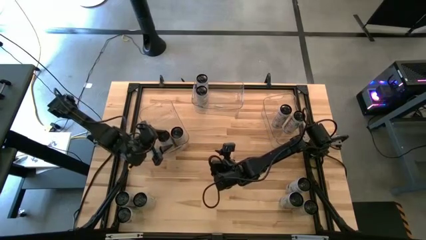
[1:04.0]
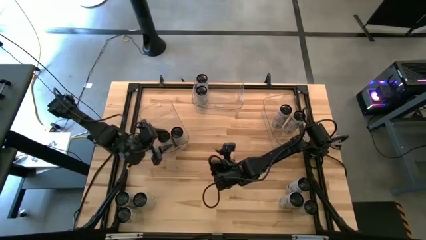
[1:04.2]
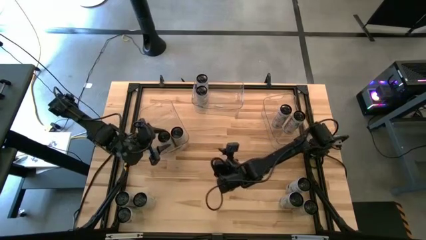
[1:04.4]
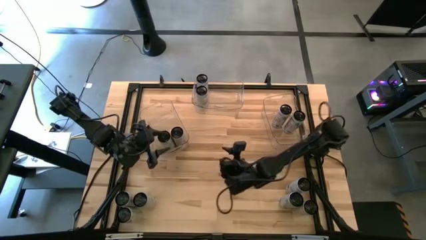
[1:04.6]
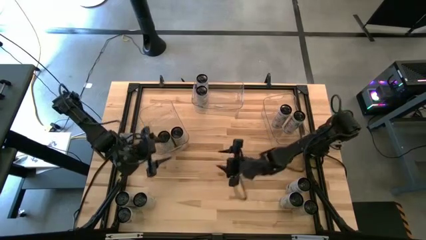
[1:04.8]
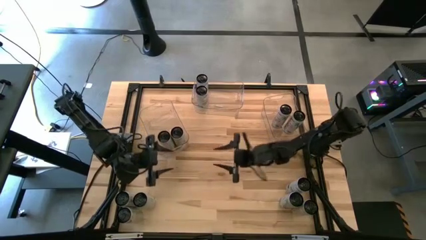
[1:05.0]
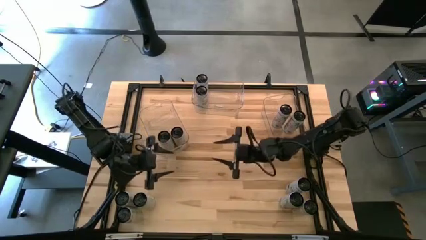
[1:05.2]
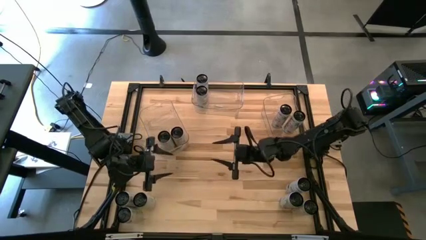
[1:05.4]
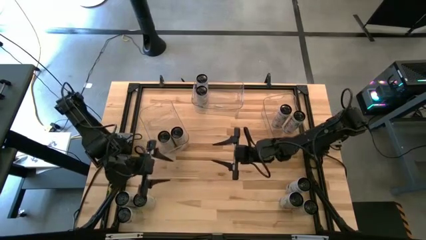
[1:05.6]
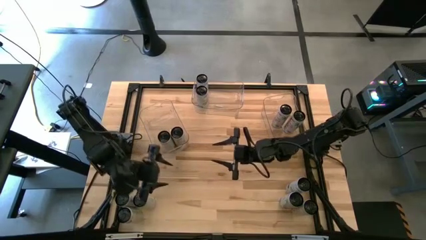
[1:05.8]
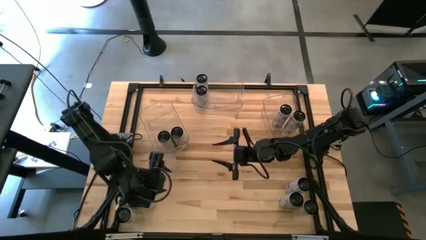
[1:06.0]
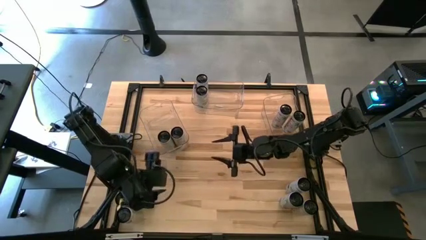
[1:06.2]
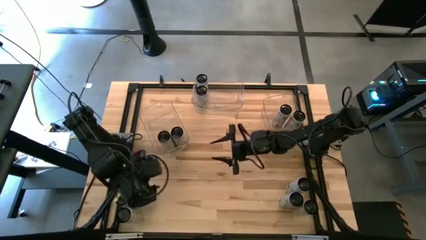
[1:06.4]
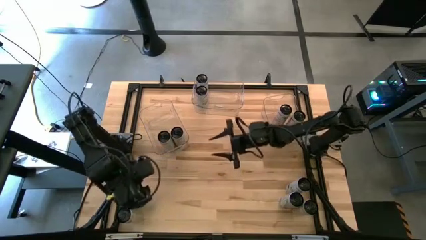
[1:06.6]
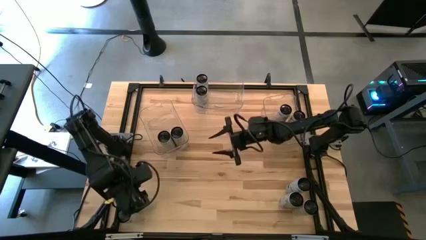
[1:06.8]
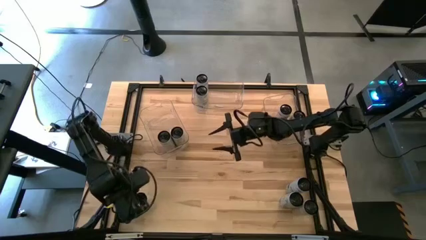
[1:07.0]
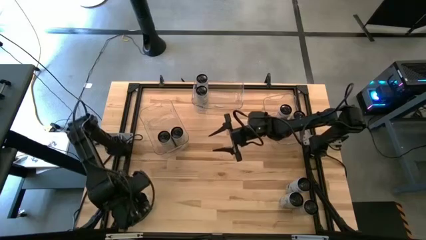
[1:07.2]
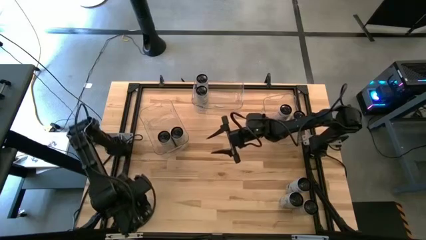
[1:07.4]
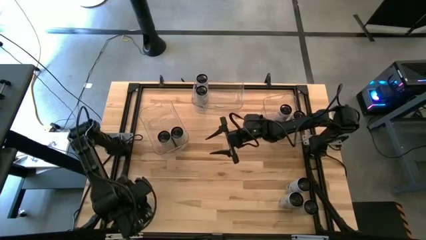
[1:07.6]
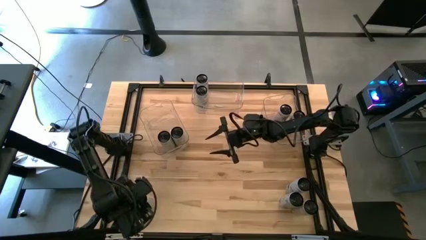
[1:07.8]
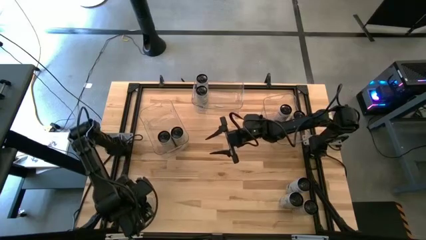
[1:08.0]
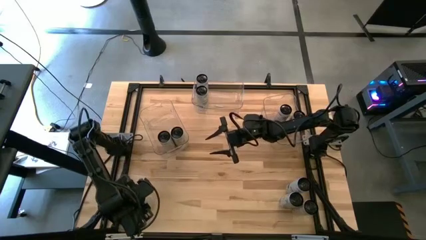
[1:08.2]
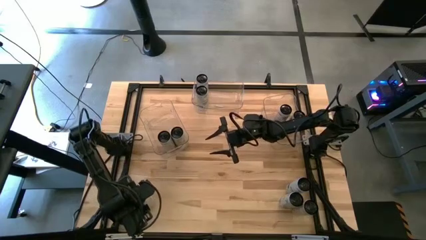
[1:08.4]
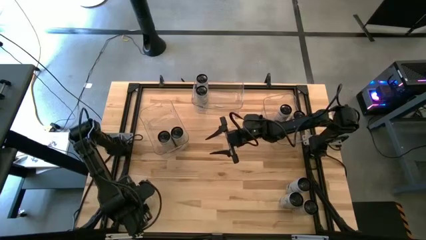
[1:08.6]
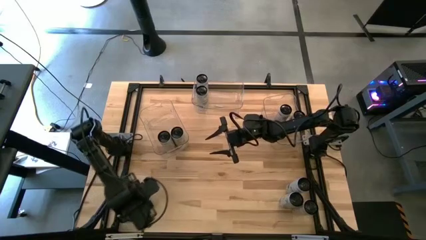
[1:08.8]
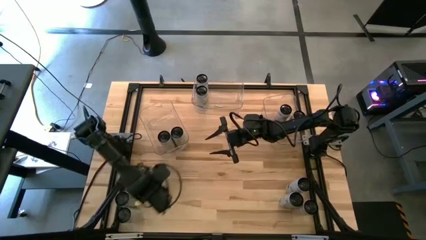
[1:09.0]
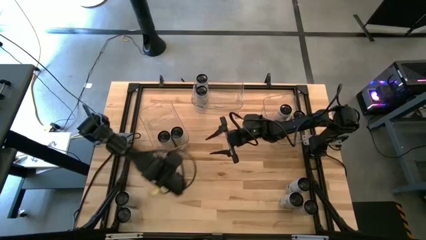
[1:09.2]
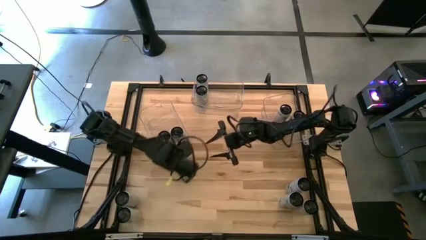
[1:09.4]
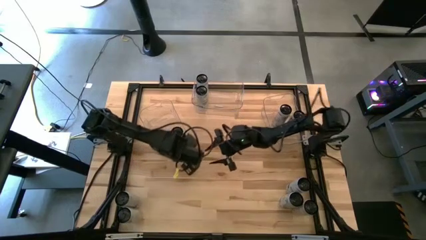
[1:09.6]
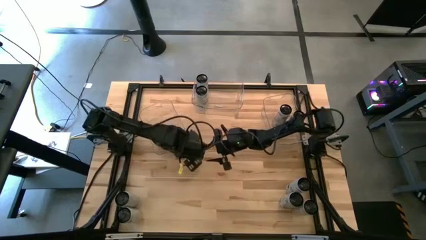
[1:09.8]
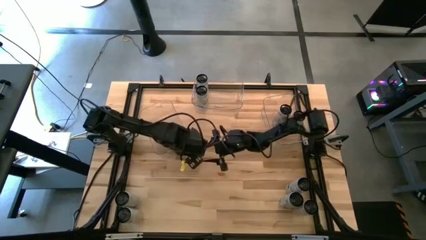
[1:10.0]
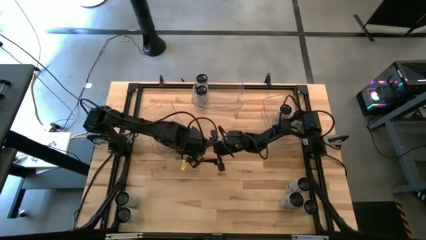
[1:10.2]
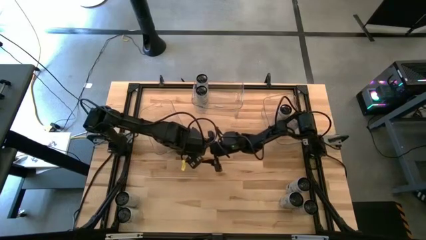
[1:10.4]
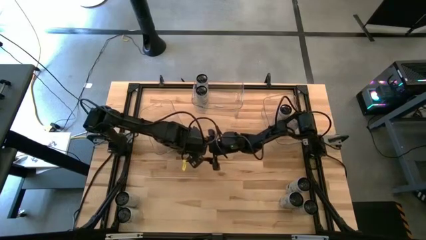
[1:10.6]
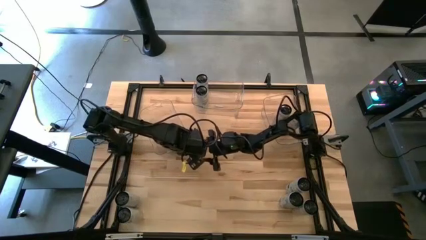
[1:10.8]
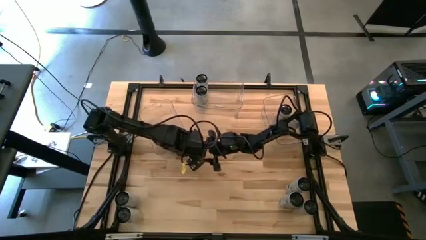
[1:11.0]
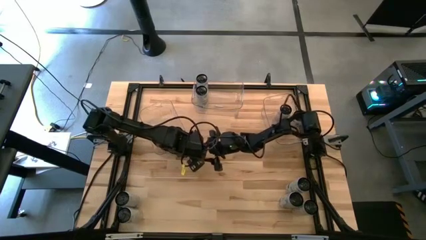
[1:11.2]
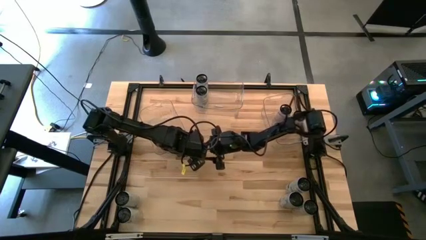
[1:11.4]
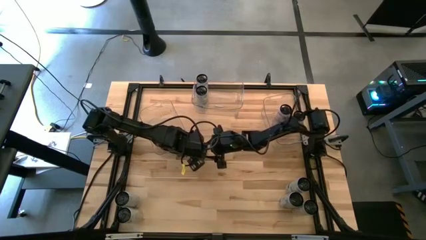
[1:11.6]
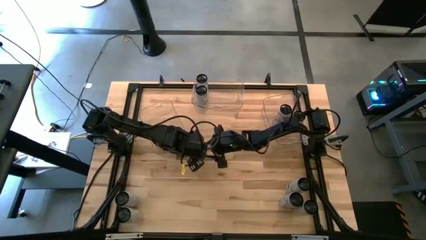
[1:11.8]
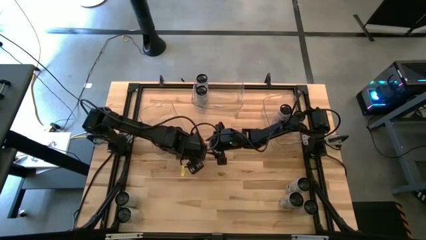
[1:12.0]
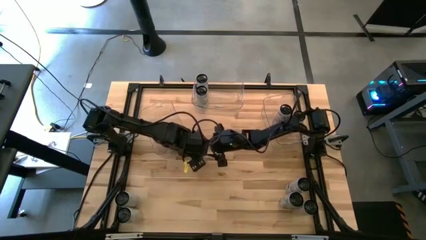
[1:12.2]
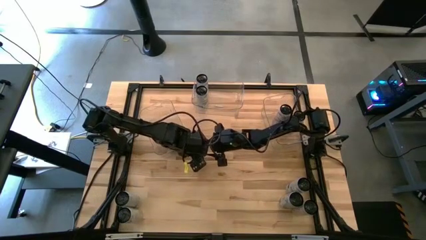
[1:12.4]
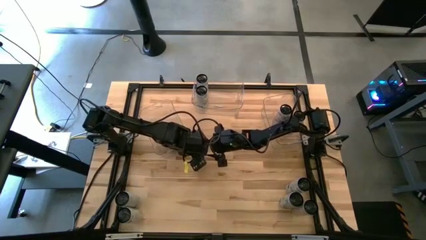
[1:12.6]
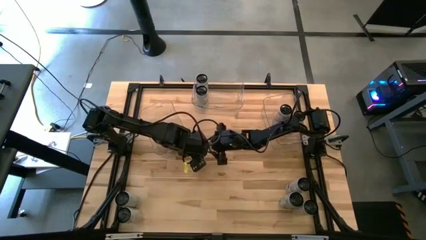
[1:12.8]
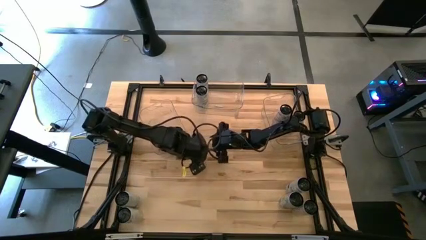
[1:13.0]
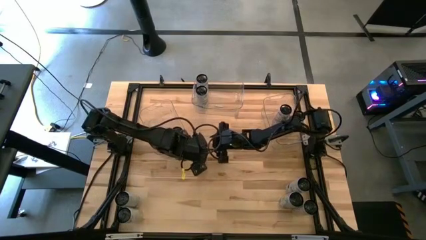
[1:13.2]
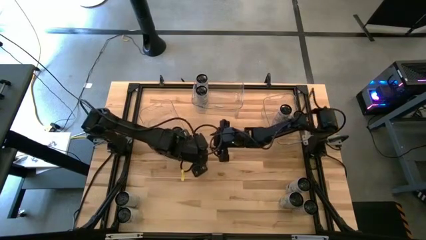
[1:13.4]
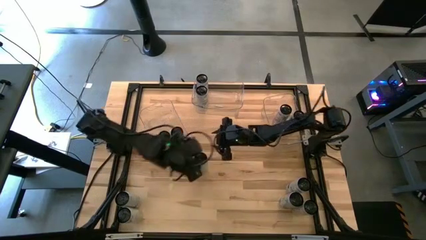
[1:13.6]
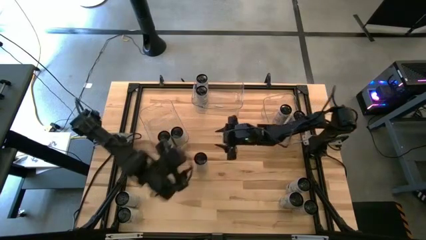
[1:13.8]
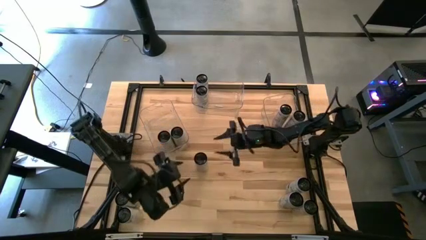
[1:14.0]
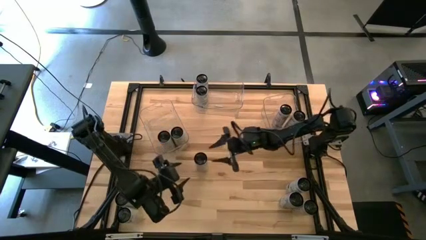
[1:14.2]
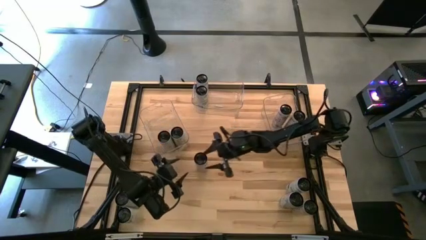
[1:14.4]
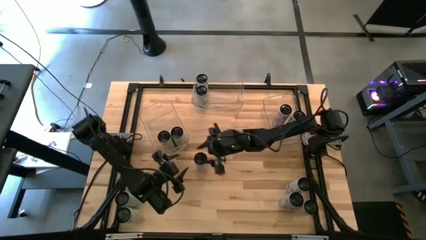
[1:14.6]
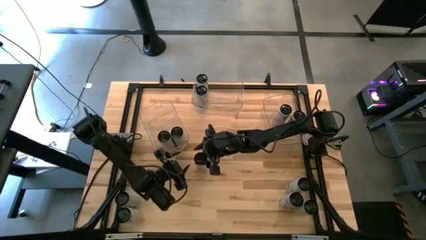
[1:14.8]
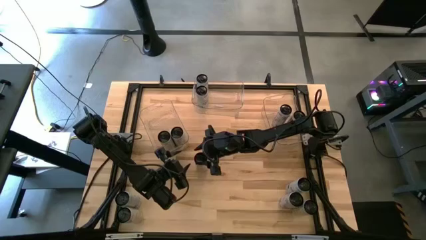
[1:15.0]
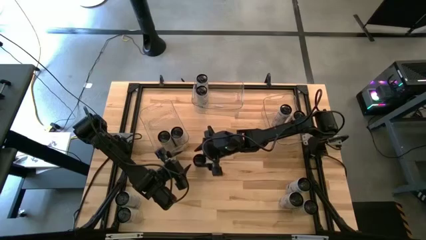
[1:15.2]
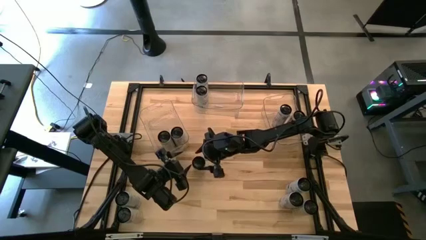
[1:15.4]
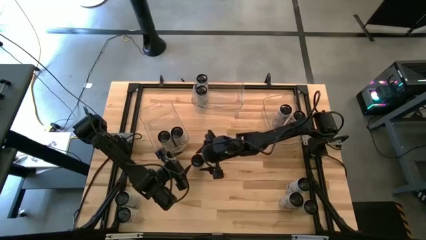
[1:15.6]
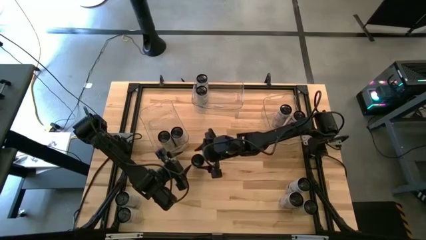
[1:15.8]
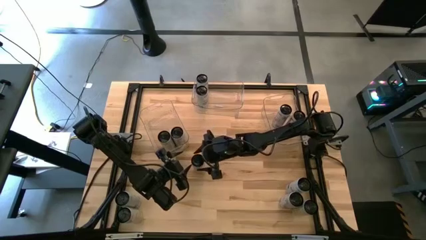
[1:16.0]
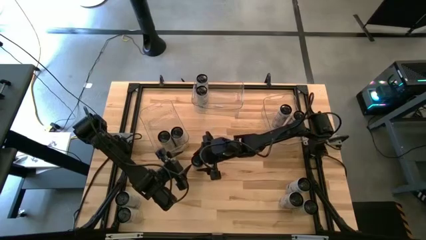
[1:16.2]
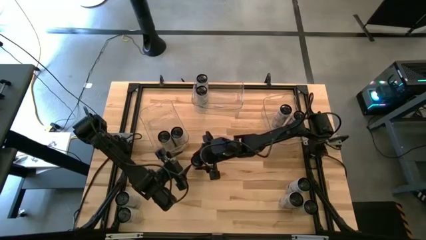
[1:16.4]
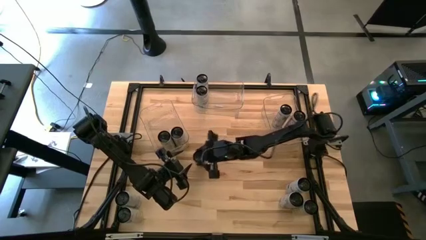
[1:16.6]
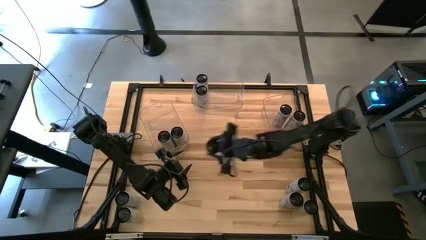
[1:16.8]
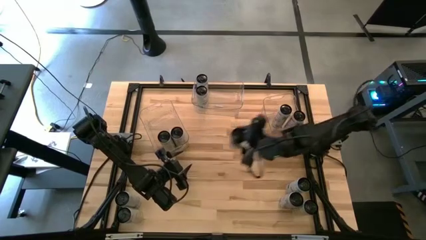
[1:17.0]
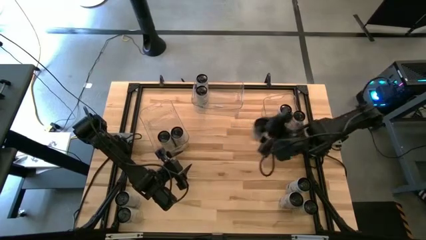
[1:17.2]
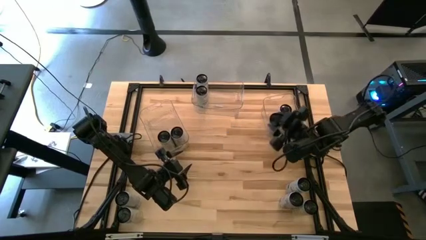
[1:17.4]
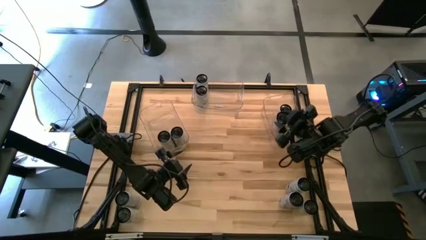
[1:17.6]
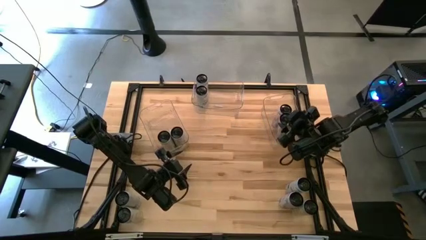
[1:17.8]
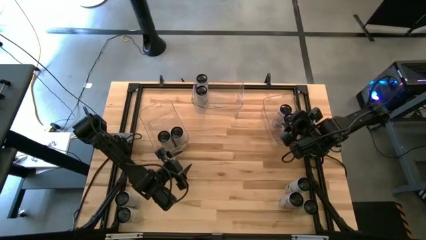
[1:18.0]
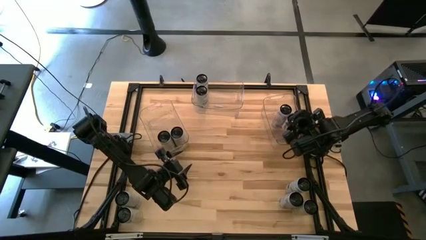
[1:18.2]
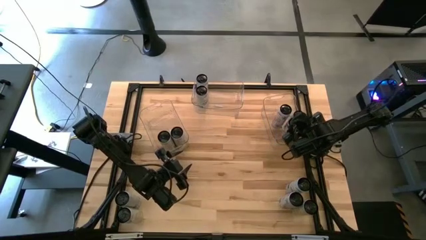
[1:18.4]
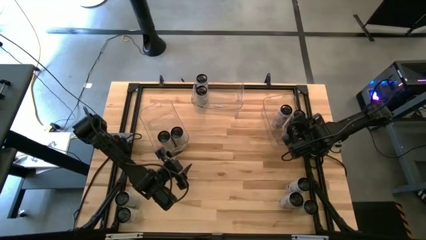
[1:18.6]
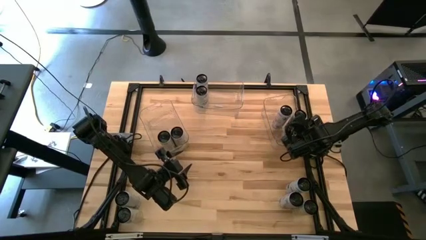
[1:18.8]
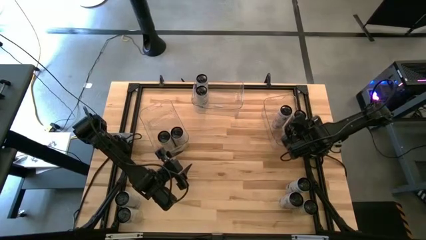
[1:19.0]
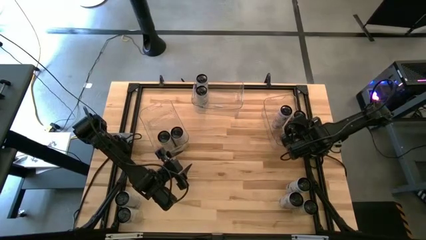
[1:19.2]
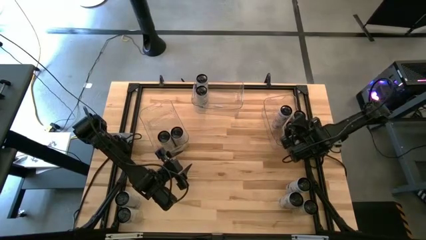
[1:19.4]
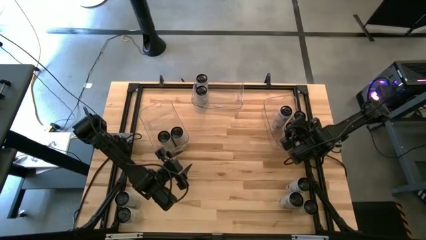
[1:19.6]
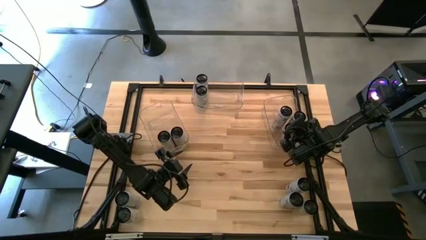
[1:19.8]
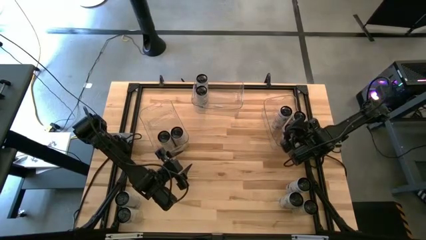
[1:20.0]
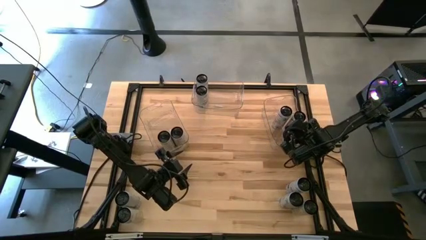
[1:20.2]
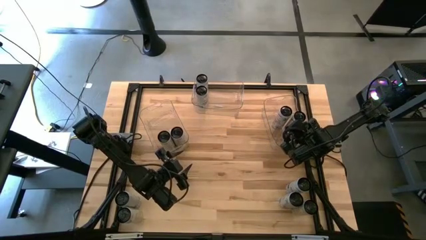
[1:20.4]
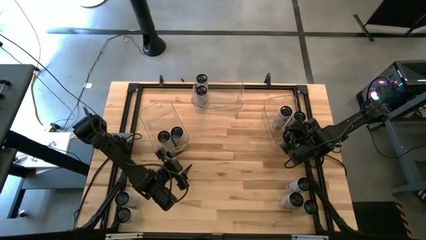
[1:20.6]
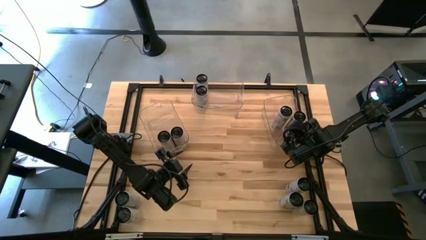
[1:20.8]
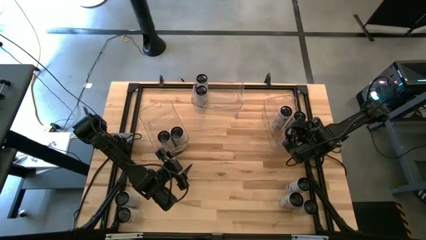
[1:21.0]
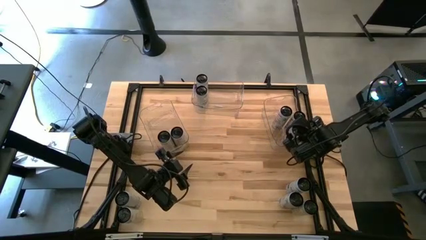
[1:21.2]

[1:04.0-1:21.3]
Task: Sort soda cans
Put the white/pink soda can into the right transparent bin
